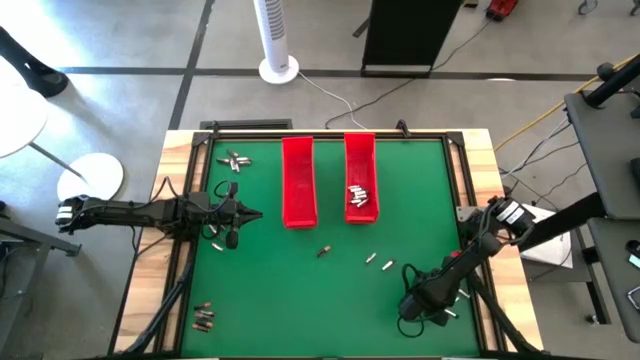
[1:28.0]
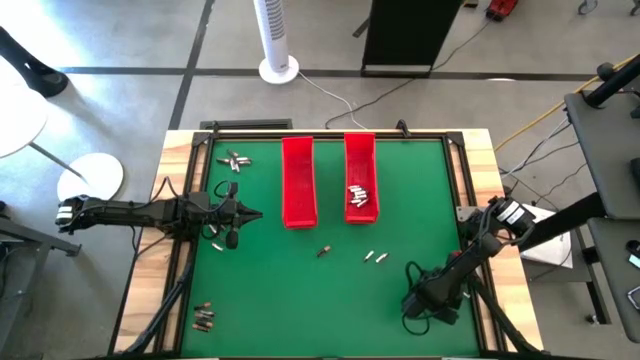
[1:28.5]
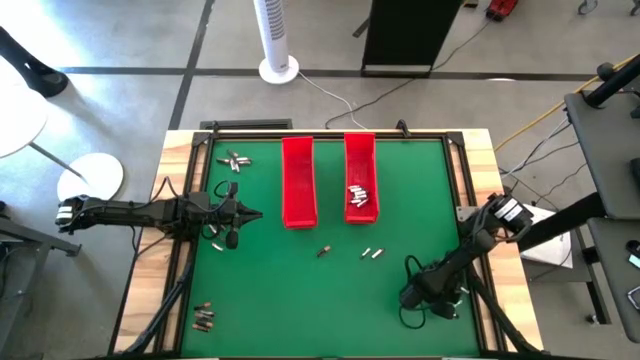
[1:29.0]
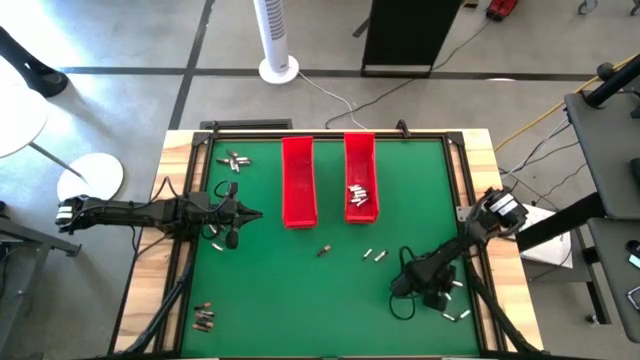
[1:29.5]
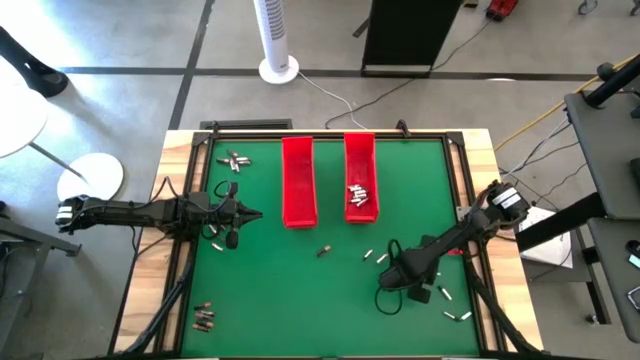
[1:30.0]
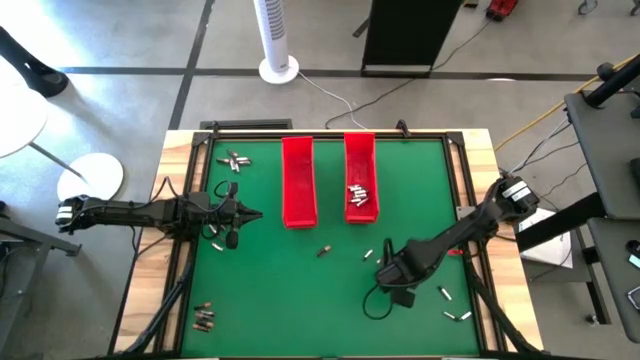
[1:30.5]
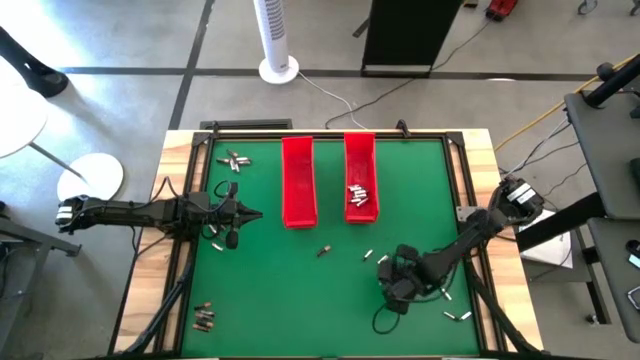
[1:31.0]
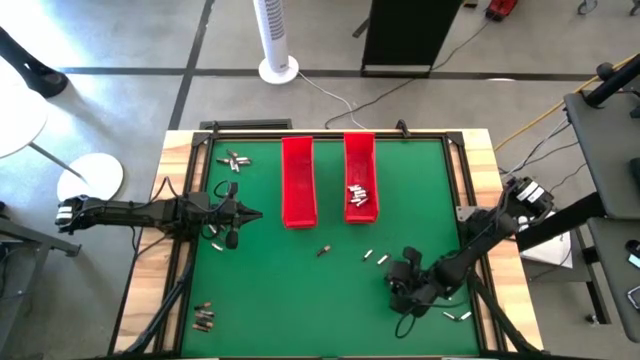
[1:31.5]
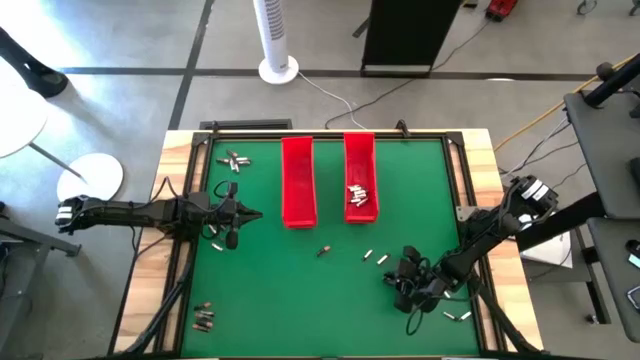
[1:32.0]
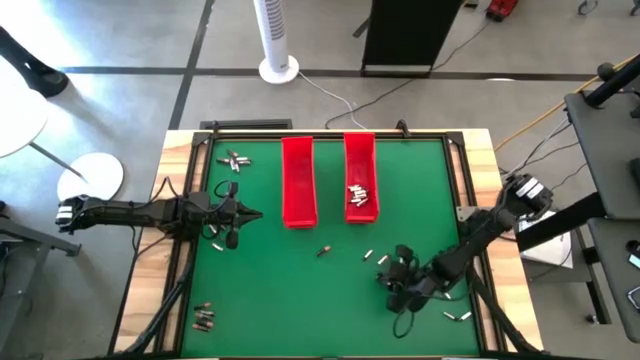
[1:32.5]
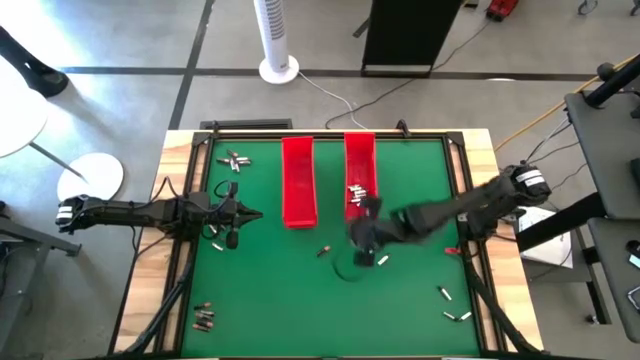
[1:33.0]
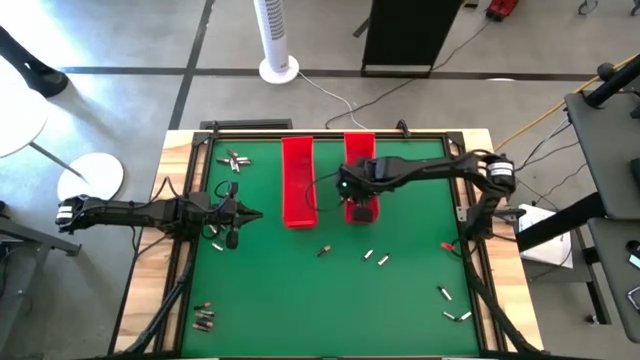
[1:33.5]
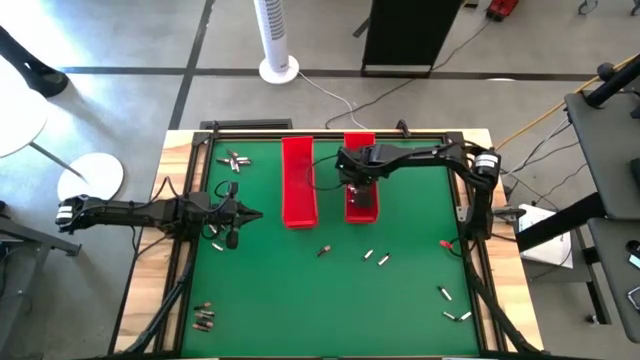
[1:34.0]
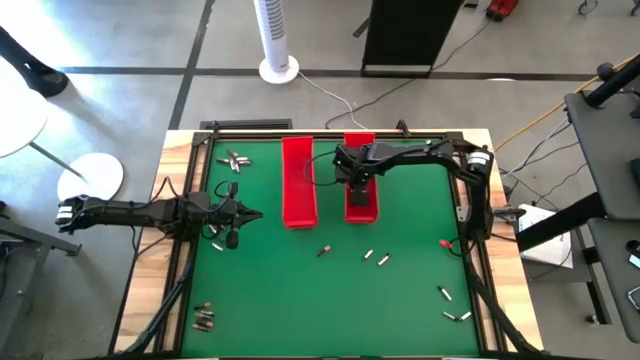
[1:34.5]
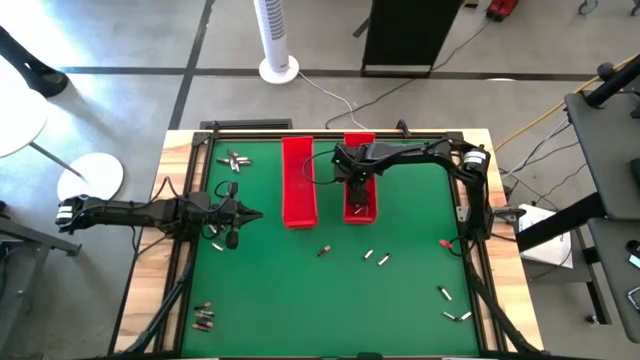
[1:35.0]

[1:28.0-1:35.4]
Task: Sort batteries
Put the silver battery into the right red bin

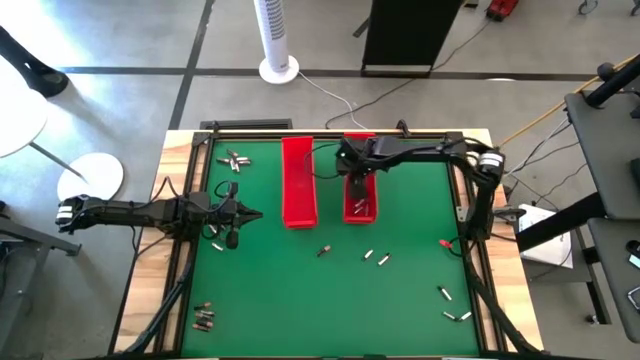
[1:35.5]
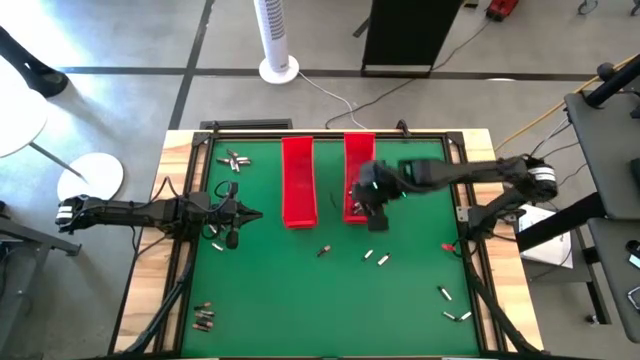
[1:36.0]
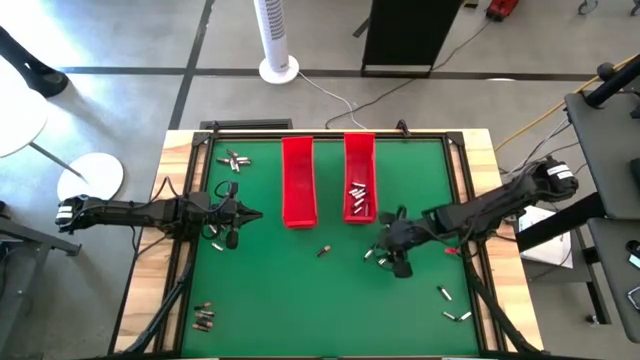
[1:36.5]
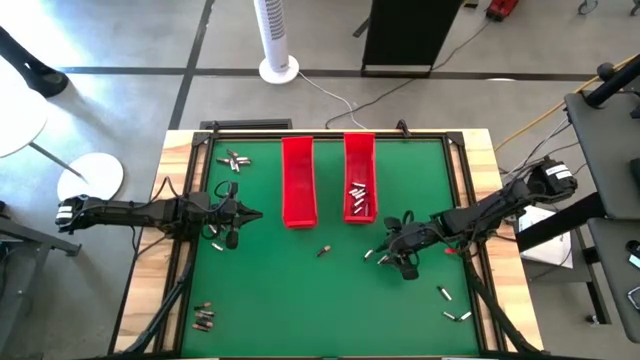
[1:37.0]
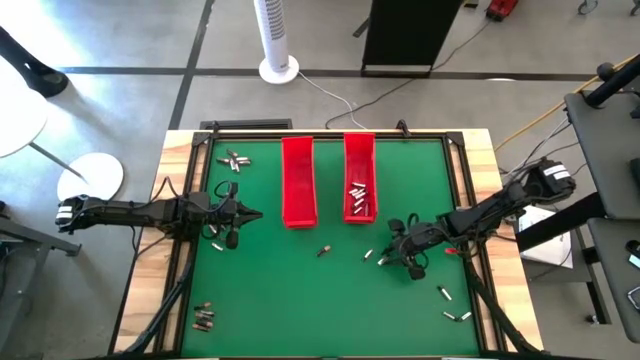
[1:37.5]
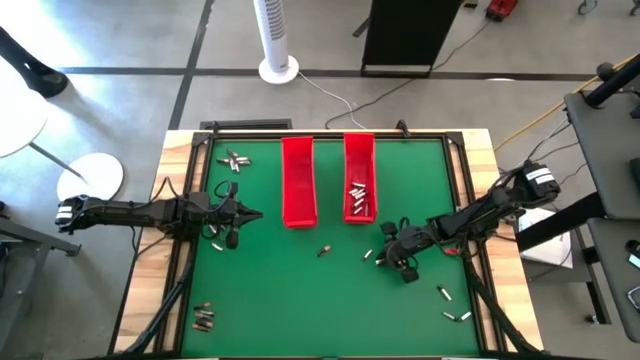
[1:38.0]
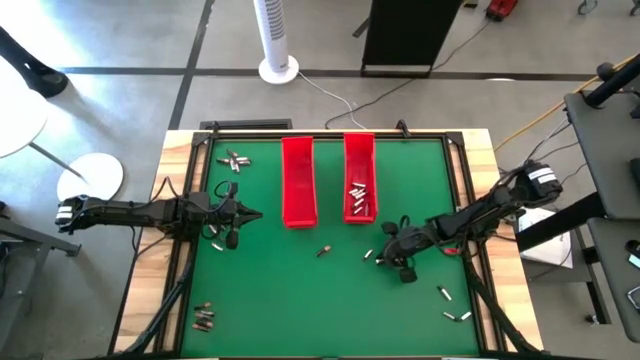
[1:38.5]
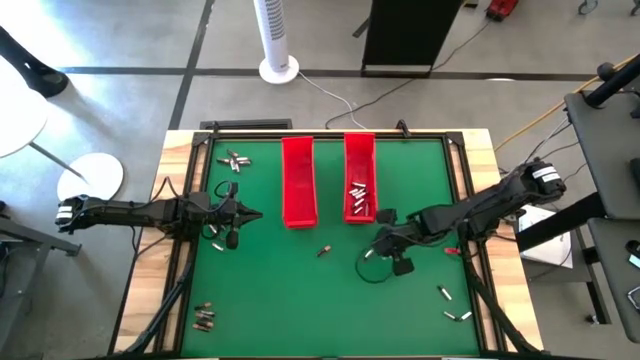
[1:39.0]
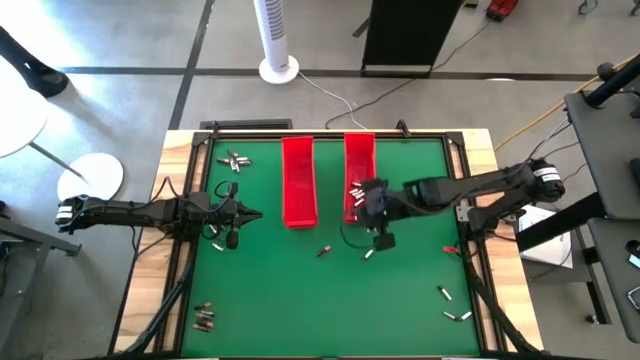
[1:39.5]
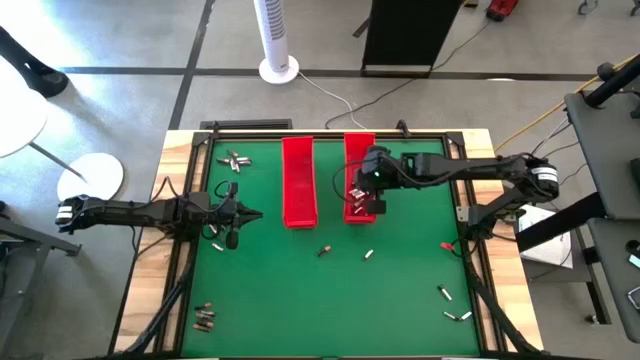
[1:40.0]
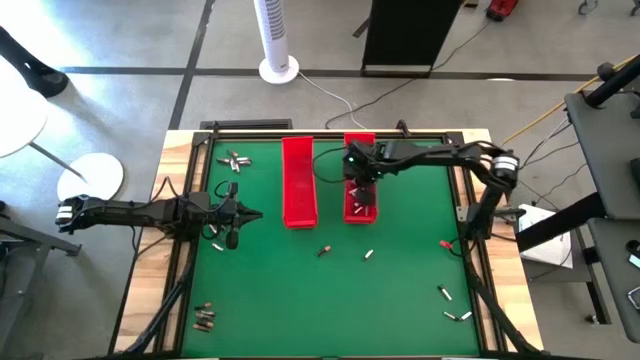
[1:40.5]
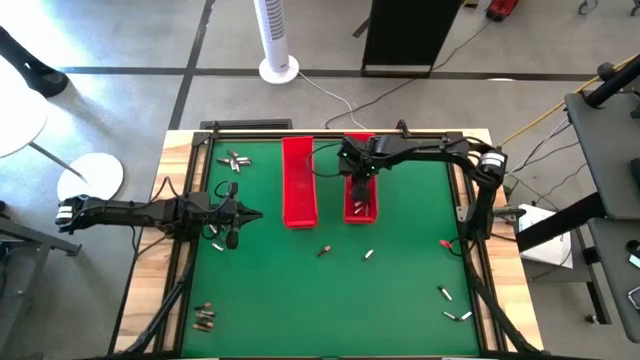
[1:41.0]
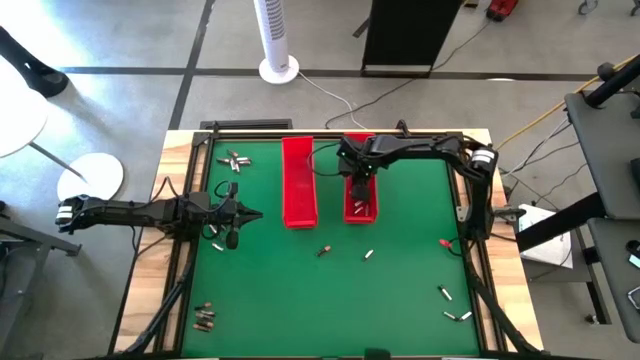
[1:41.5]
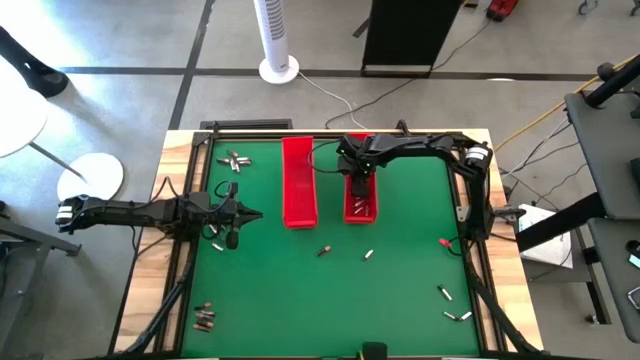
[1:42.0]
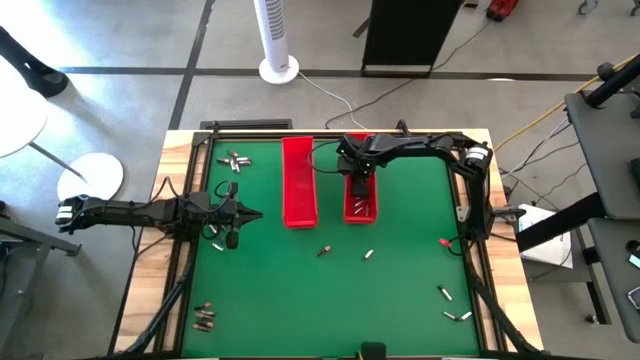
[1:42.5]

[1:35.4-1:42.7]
Put the silver battery into the right red bin

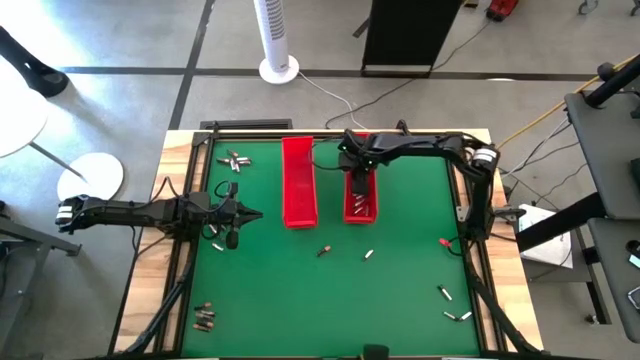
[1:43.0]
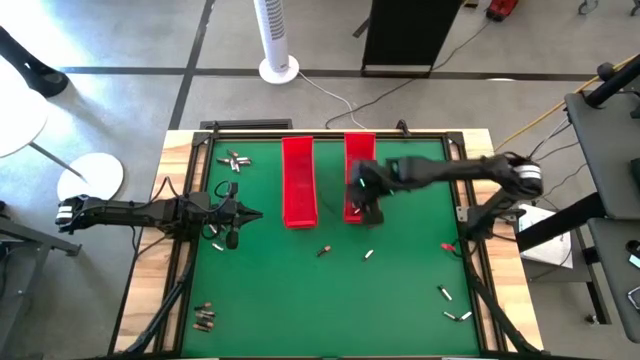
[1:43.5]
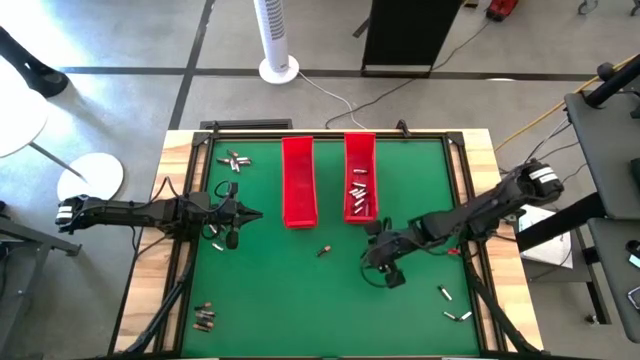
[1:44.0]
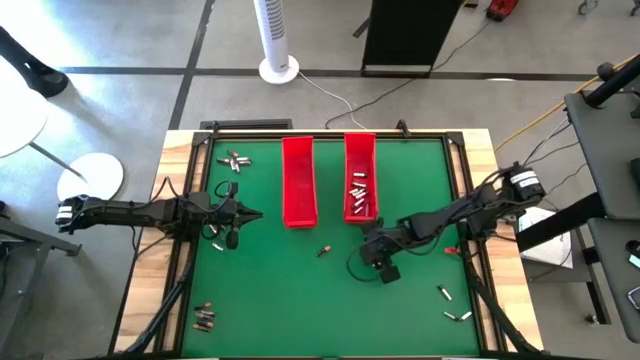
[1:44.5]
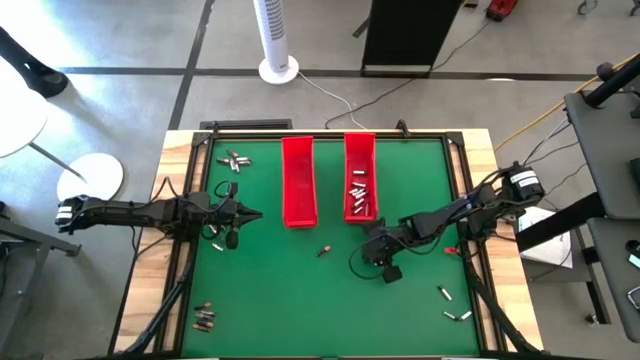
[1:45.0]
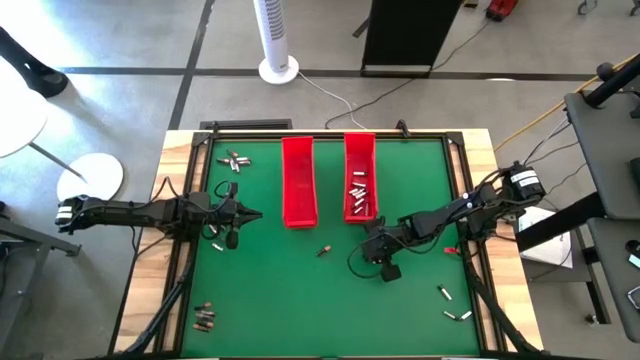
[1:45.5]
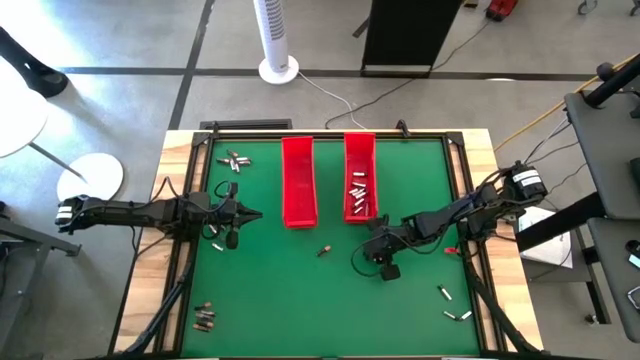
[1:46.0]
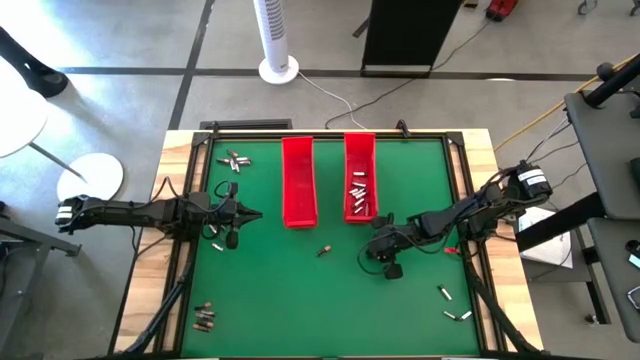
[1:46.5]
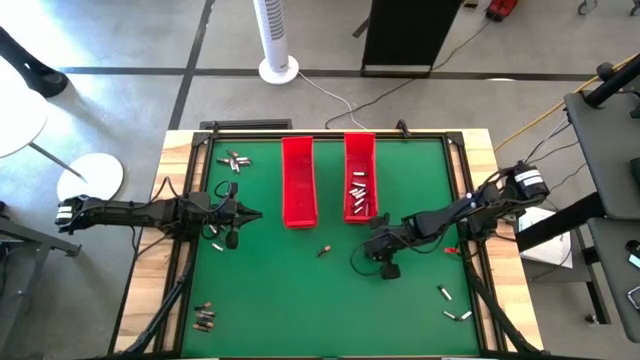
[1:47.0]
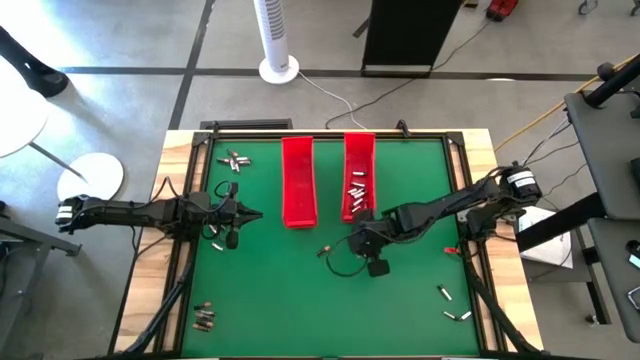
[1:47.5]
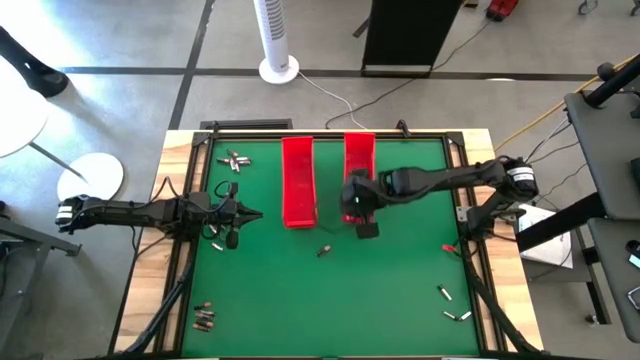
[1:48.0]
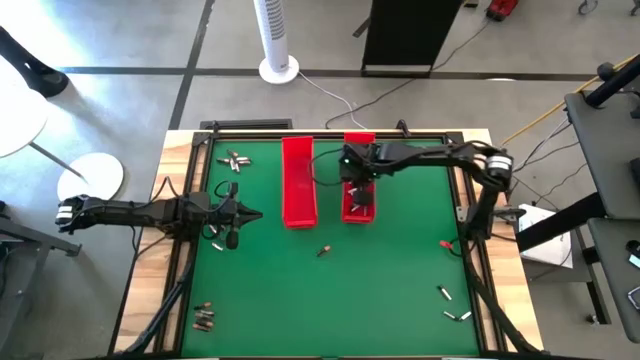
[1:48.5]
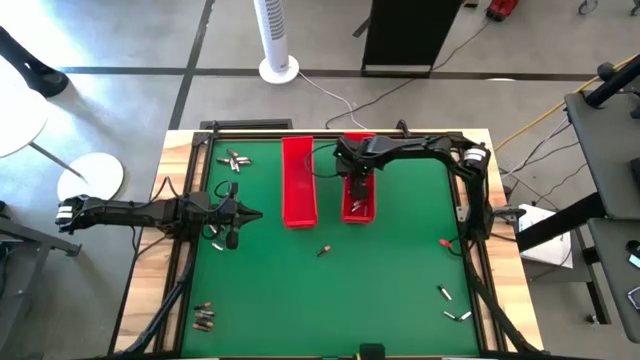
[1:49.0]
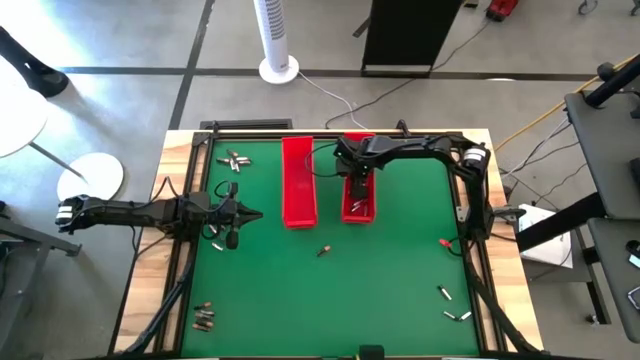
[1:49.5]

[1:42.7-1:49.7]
Put the silver battery into the right red bin
